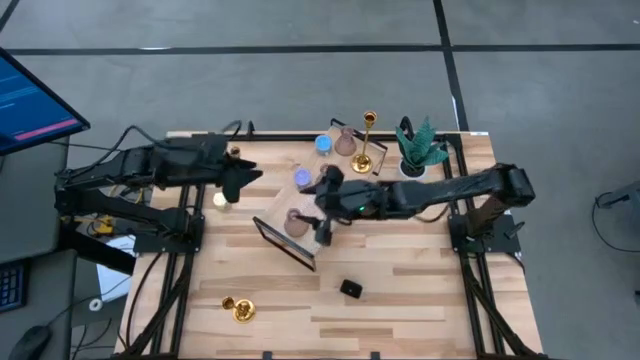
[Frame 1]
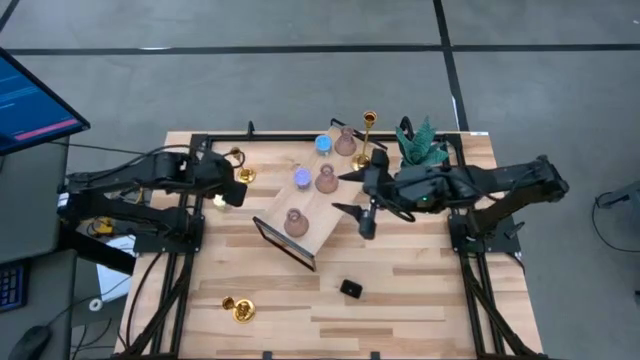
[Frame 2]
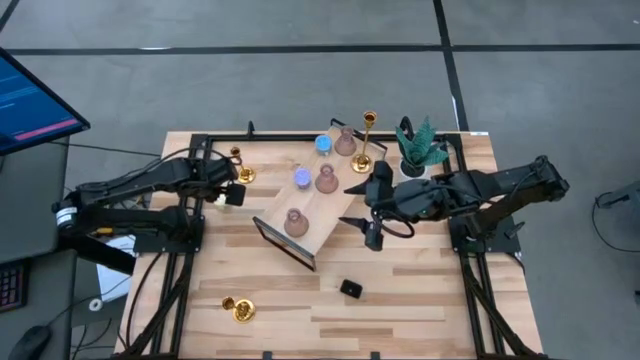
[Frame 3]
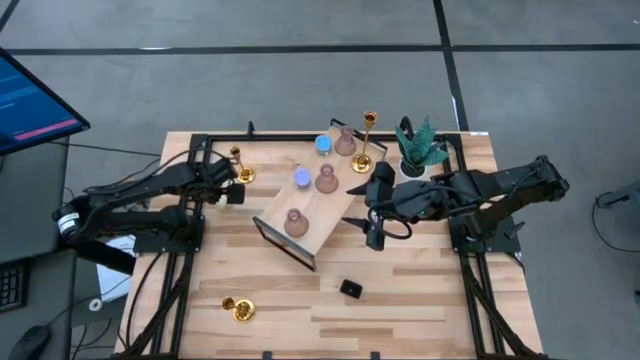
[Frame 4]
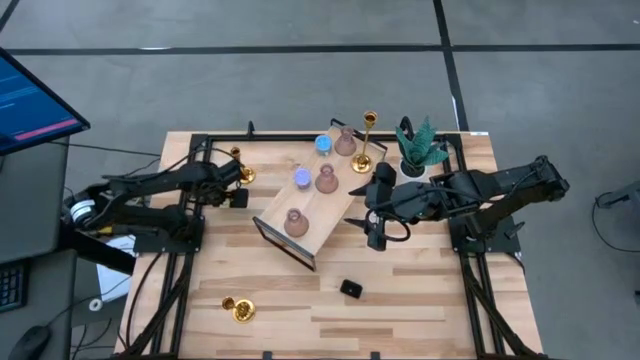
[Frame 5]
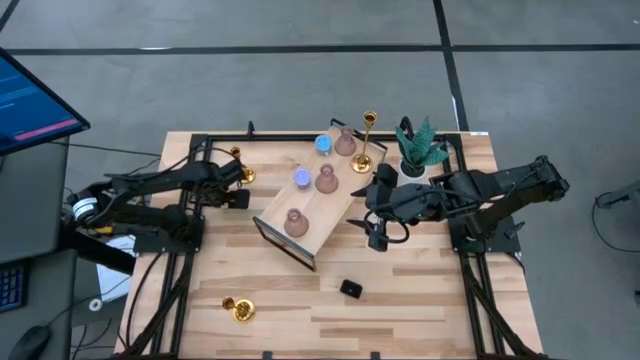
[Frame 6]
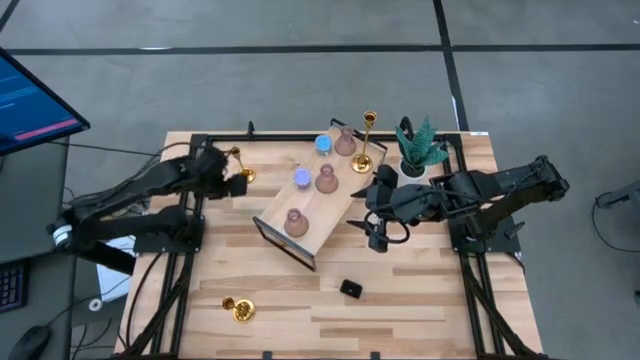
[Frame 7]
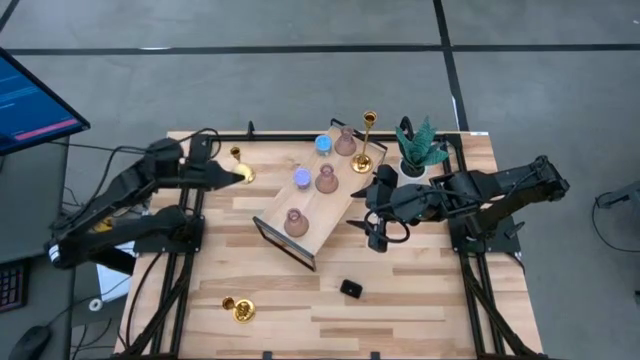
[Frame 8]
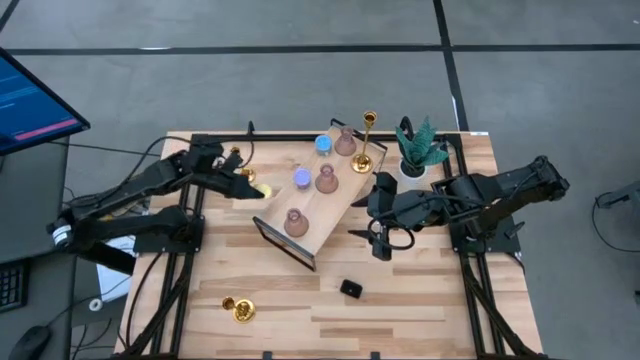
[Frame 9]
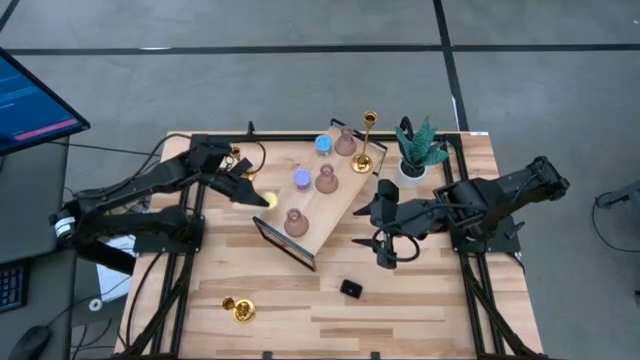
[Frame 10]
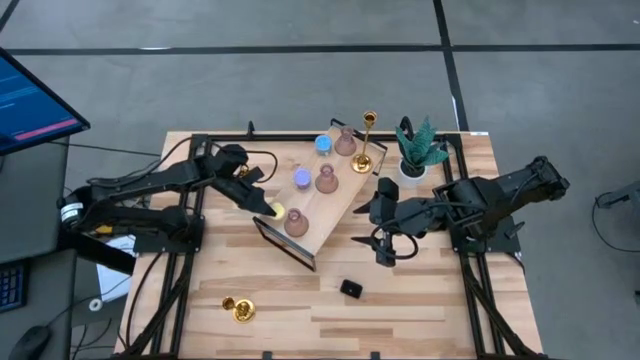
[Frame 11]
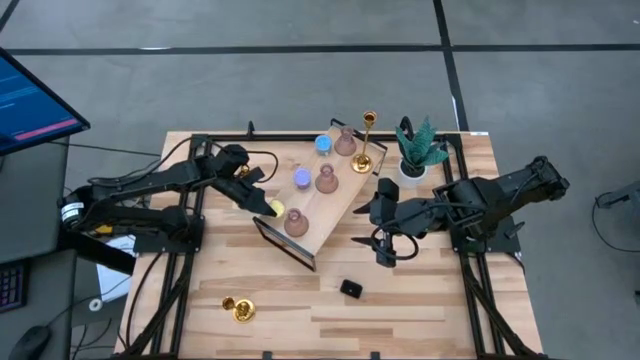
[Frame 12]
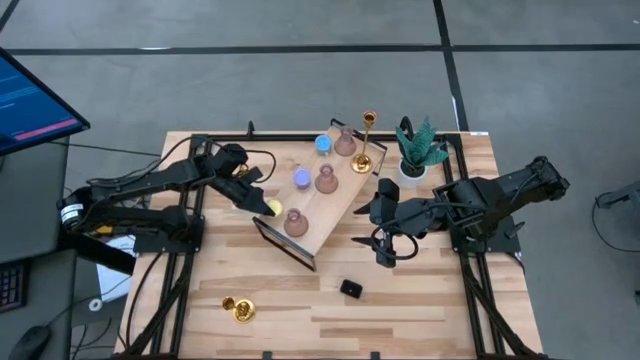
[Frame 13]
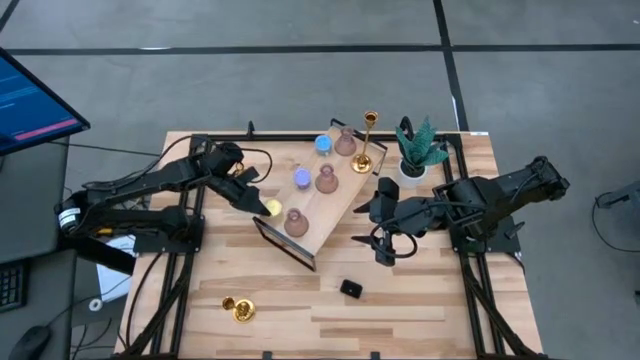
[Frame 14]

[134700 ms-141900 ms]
Task: Pick & Place candle stick holders
Put the yellow candle on the shelf

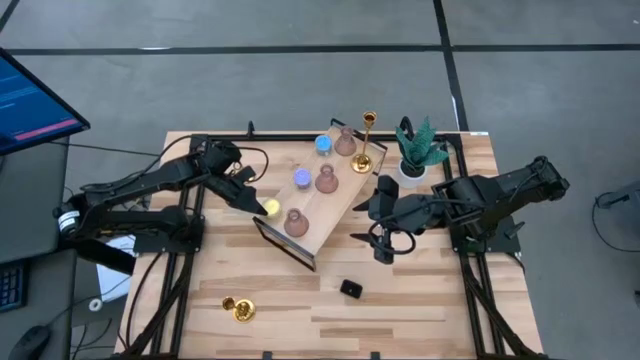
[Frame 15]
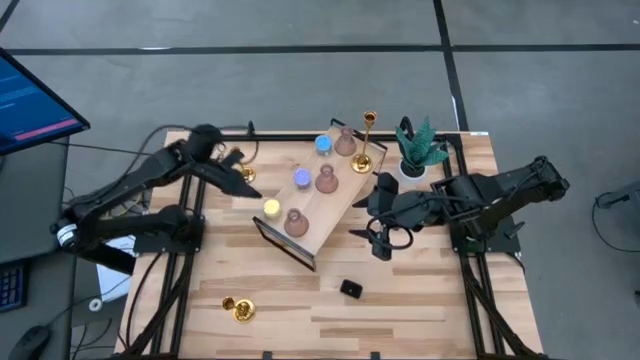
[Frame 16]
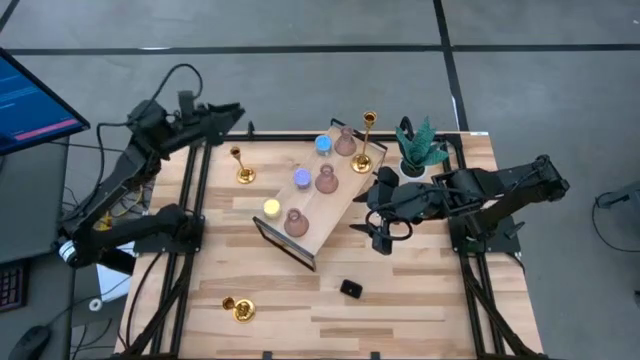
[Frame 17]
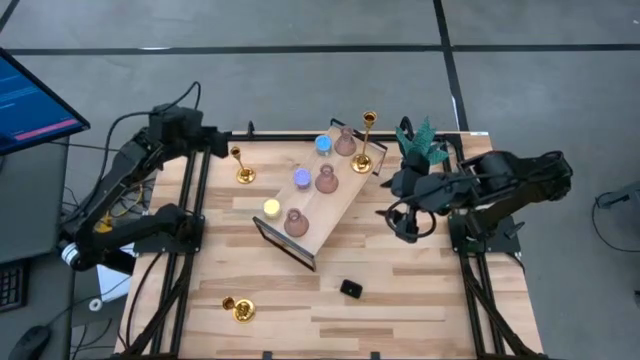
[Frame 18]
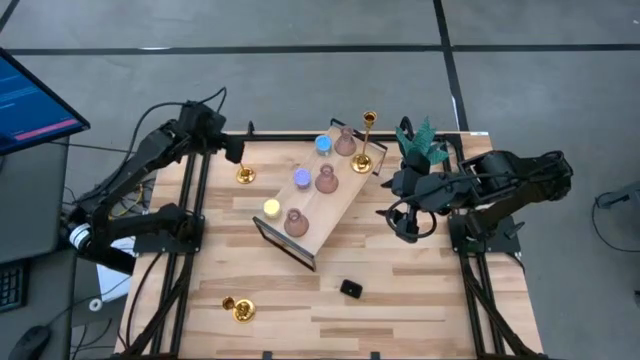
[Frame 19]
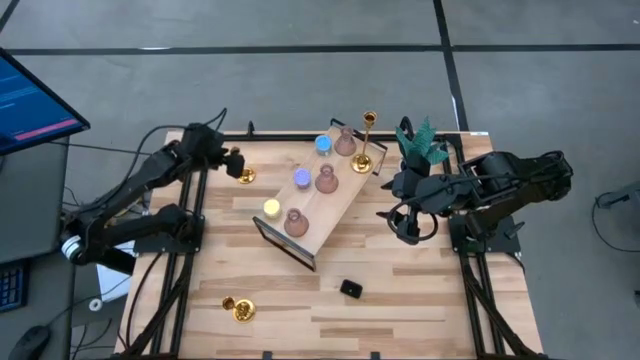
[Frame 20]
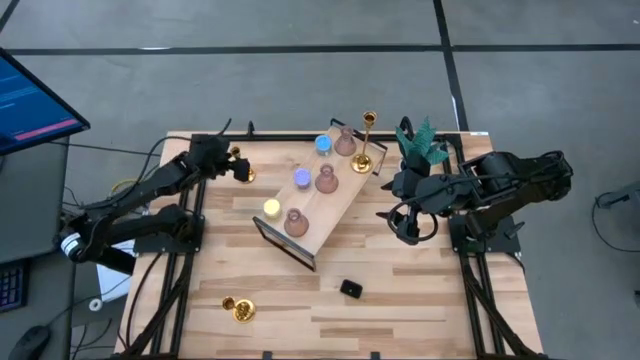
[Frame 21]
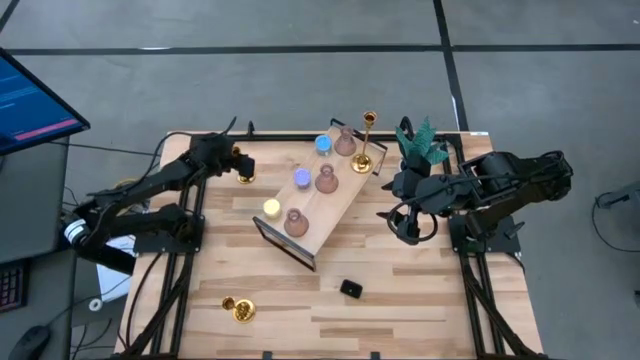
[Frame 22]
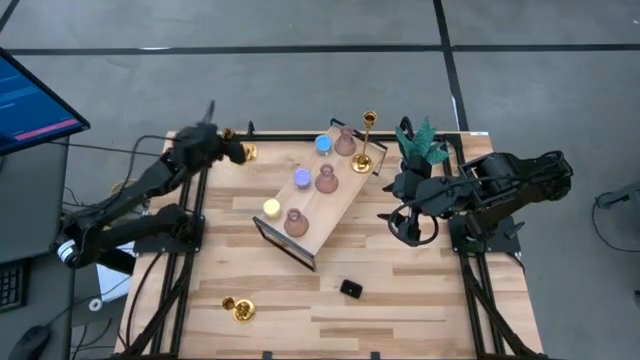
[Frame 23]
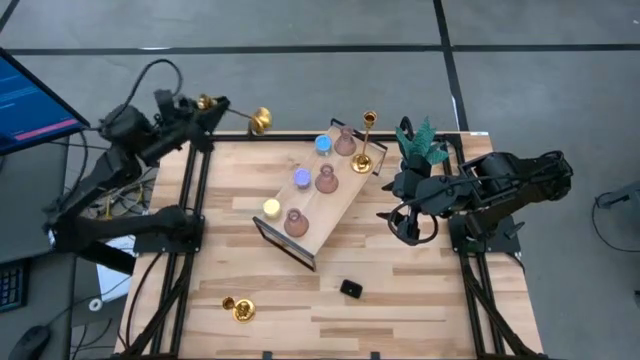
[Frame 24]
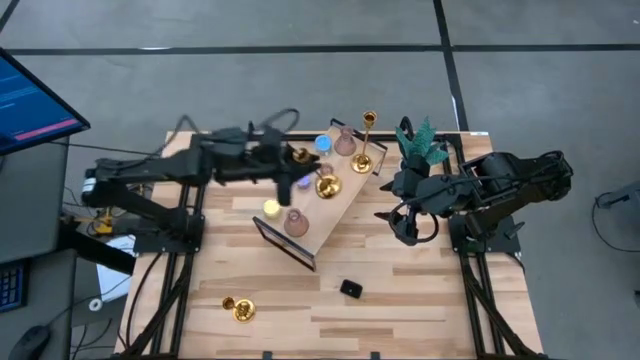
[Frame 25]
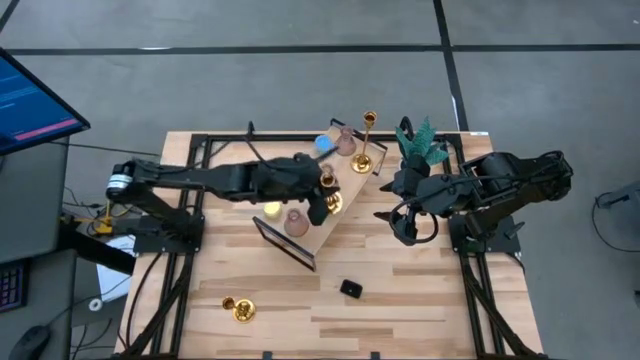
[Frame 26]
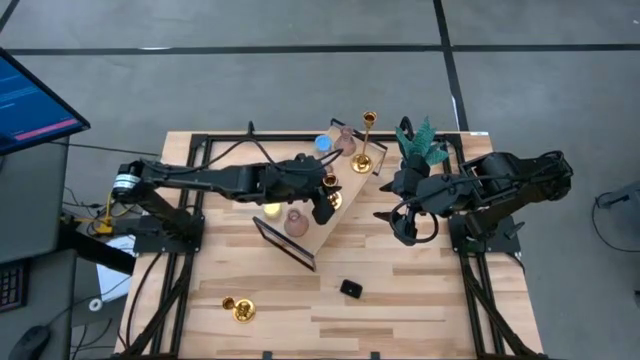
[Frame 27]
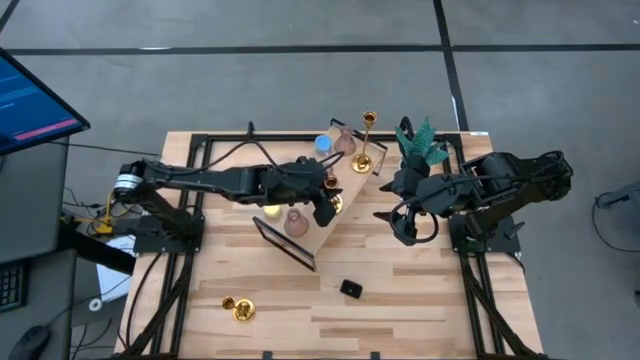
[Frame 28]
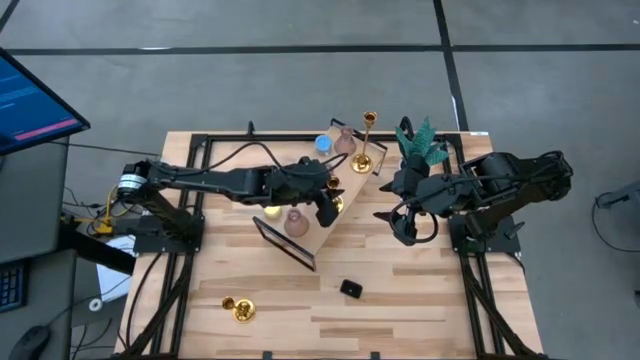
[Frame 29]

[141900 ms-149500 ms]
Put the top candle holder on the shelf

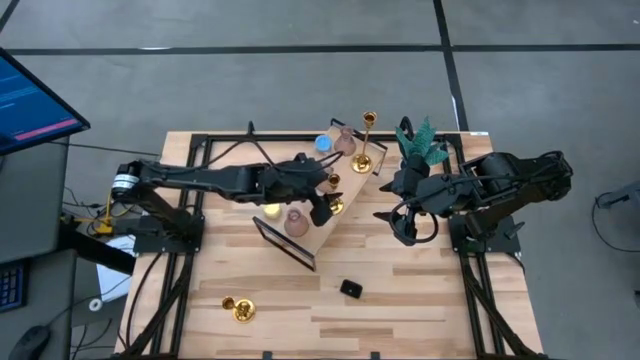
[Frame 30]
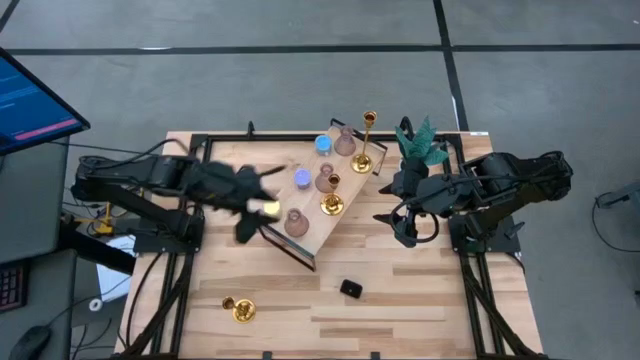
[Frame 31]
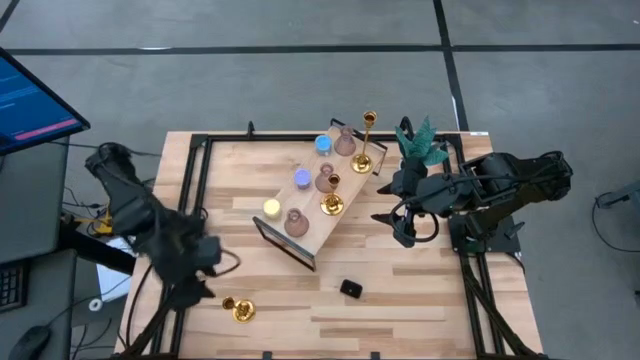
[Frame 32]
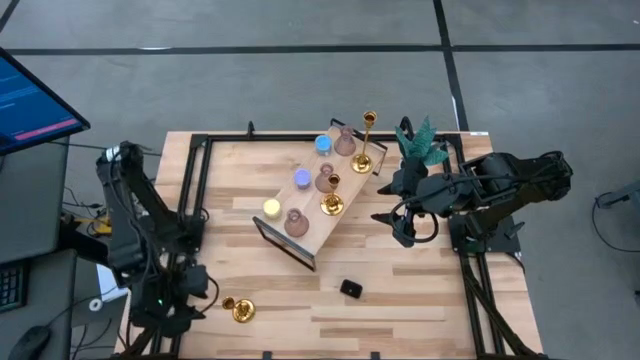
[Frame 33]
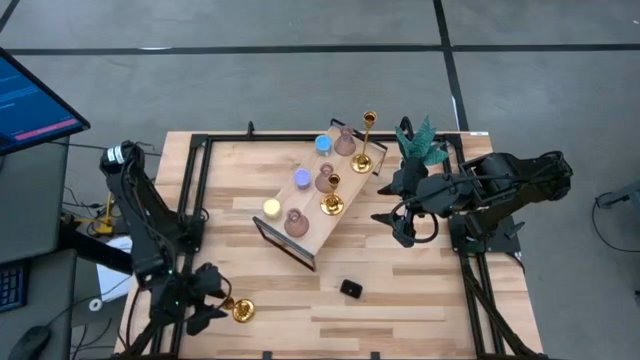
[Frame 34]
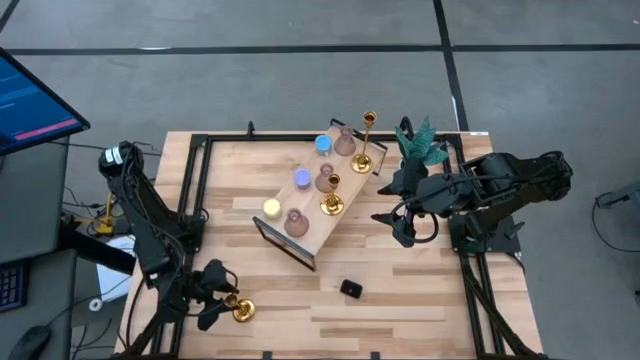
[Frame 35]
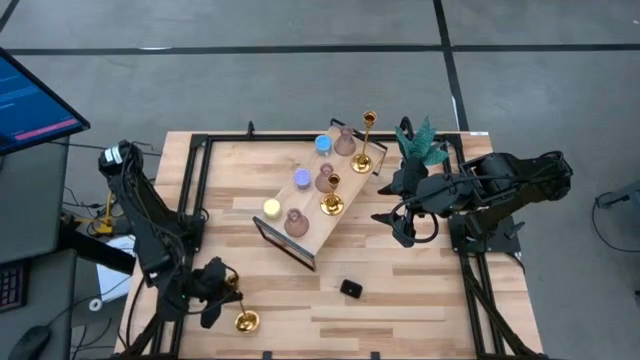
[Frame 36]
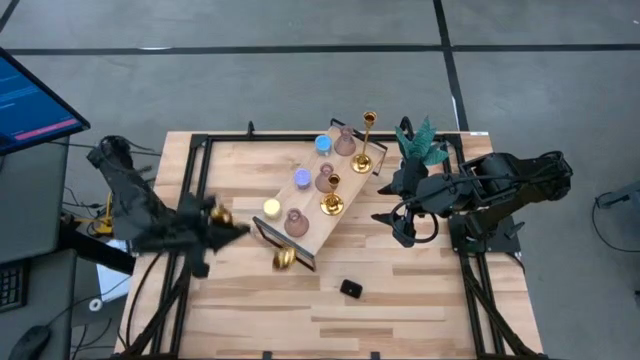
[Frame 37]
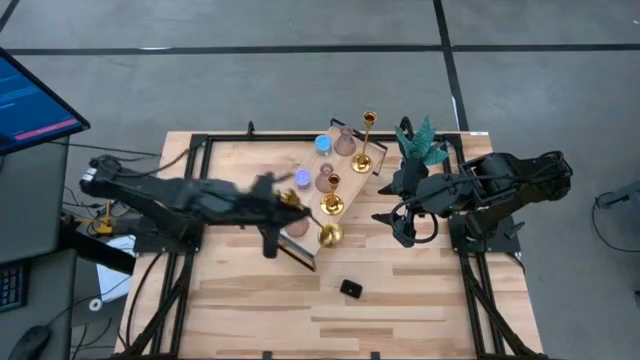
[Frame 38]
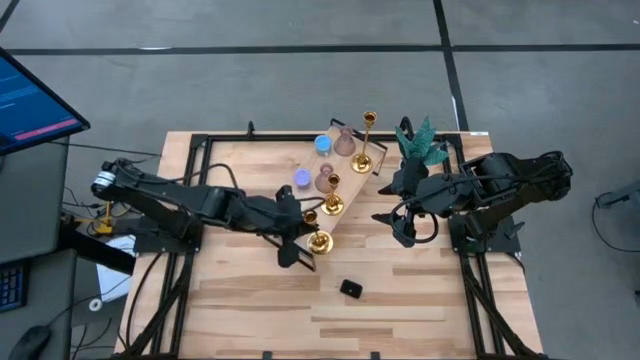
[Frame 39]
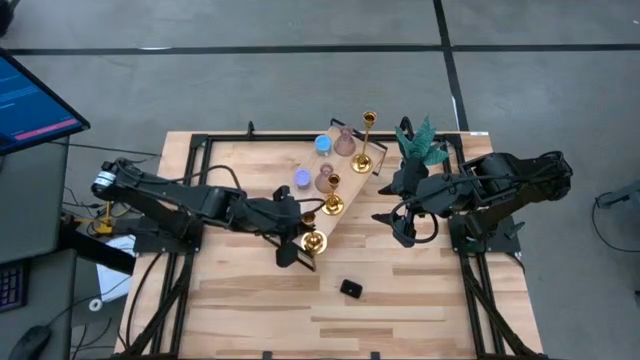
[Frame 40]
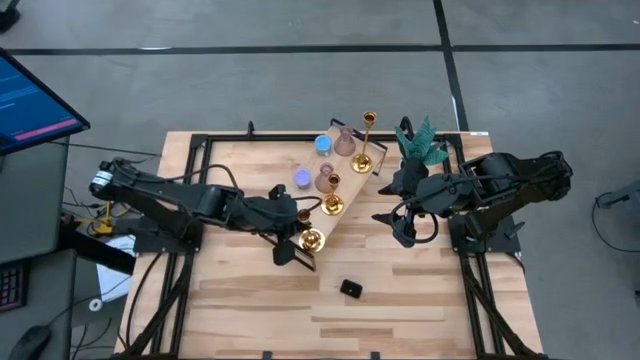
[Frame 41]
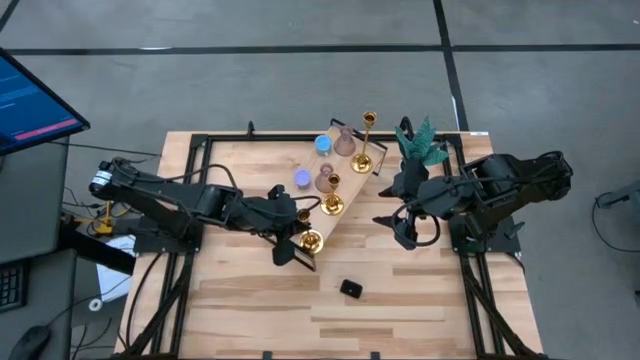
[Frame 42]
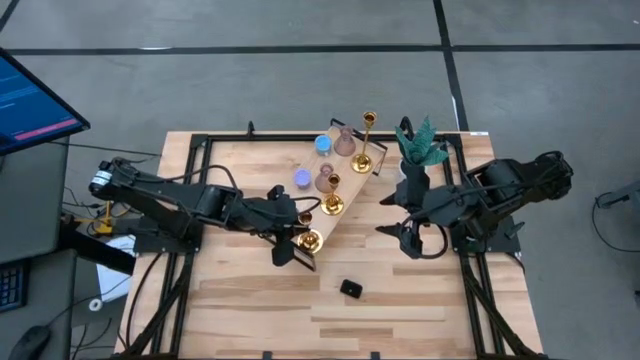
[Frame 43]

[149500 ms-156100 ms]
Put the candle holder on the shelf
